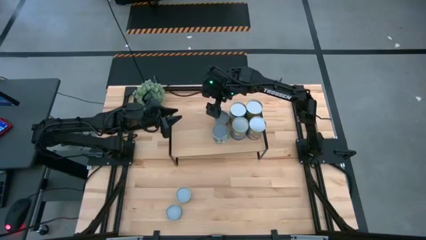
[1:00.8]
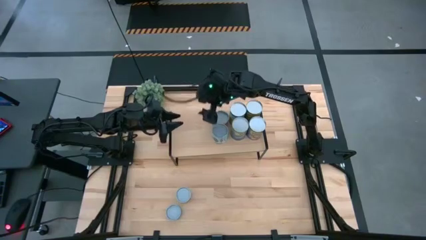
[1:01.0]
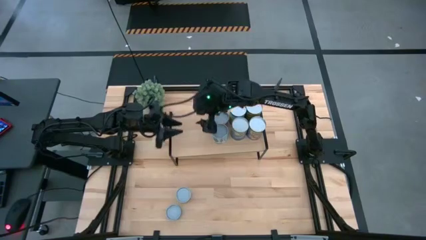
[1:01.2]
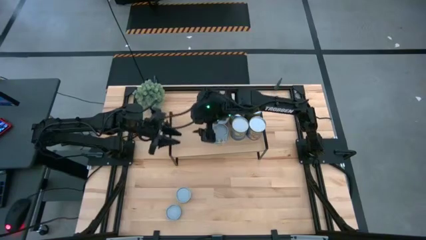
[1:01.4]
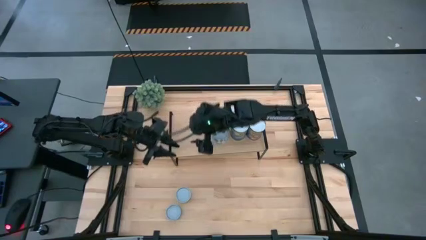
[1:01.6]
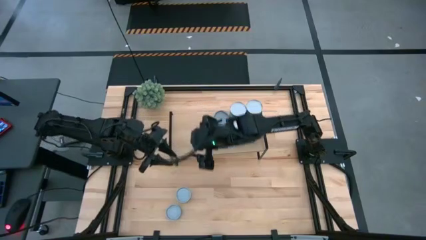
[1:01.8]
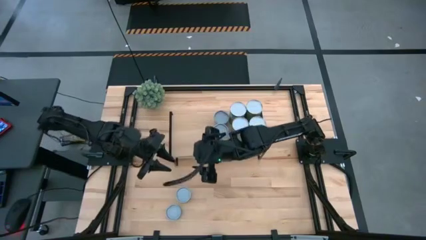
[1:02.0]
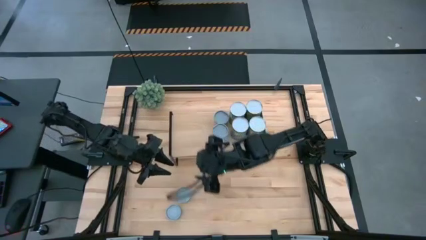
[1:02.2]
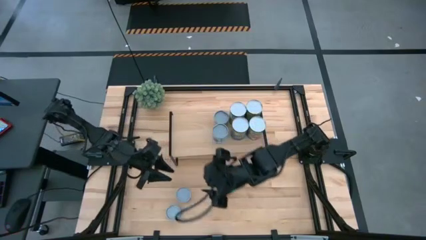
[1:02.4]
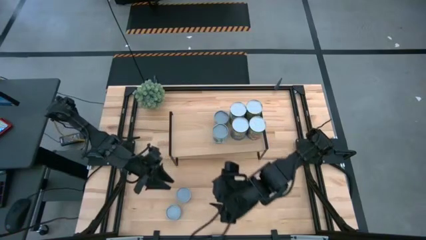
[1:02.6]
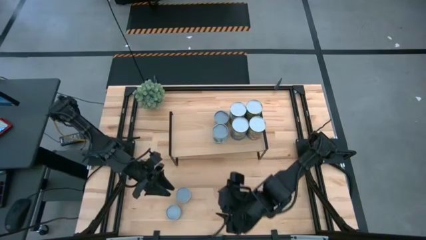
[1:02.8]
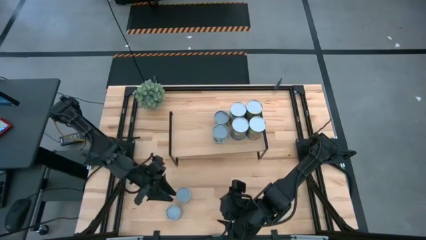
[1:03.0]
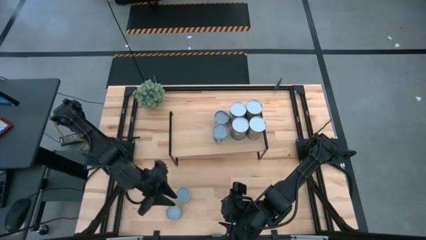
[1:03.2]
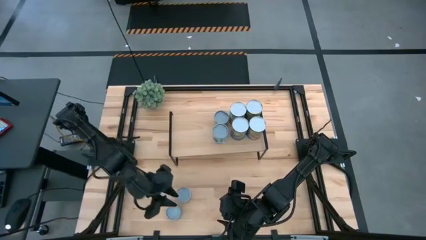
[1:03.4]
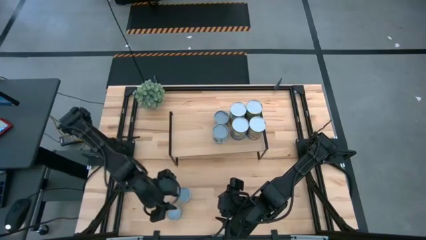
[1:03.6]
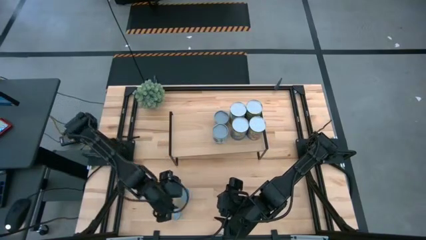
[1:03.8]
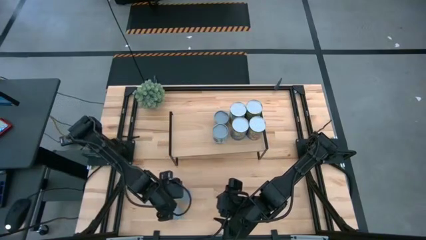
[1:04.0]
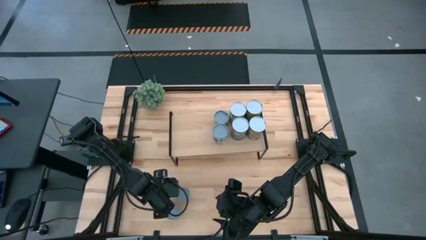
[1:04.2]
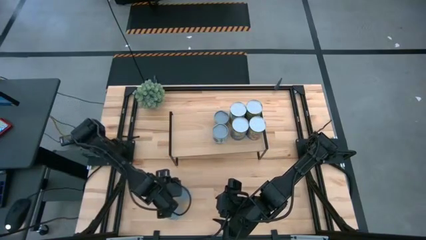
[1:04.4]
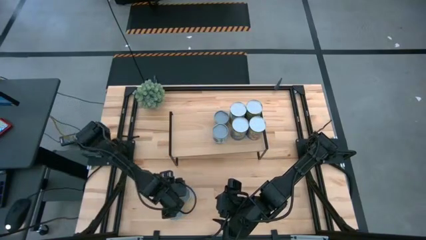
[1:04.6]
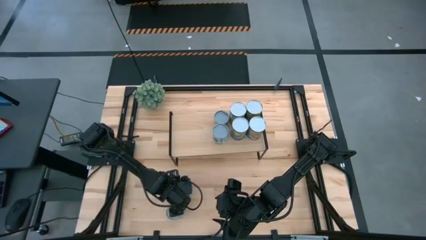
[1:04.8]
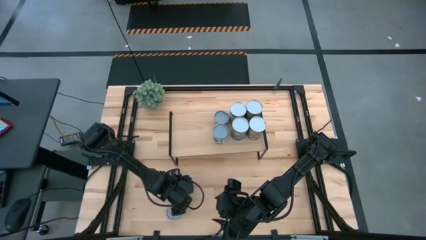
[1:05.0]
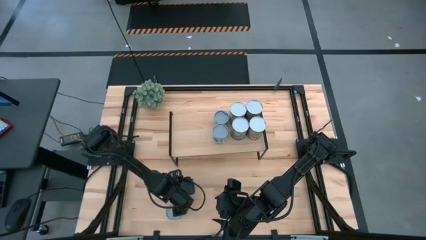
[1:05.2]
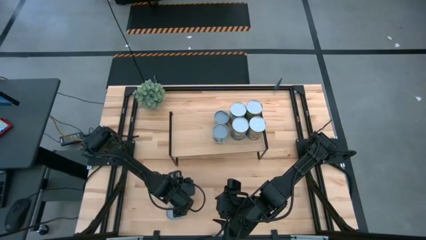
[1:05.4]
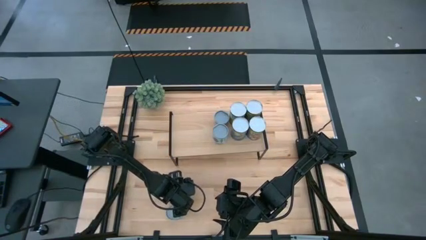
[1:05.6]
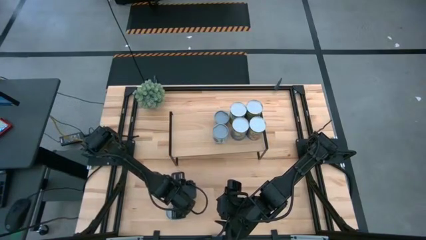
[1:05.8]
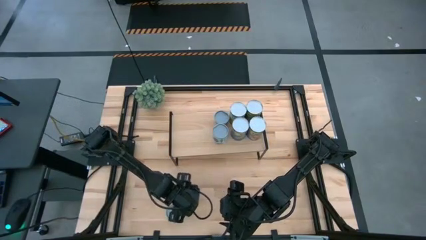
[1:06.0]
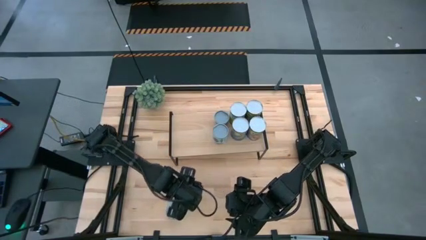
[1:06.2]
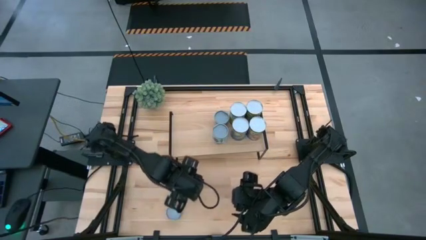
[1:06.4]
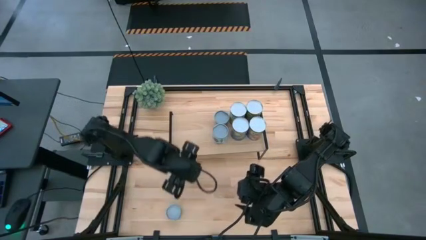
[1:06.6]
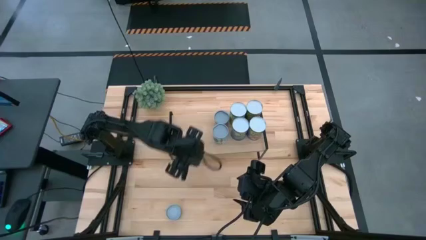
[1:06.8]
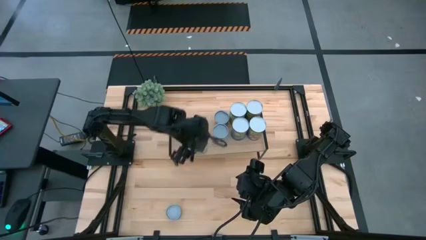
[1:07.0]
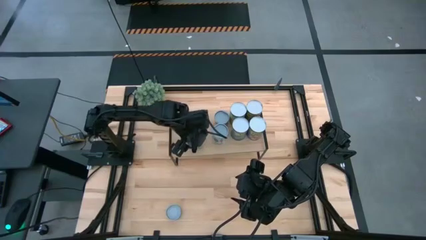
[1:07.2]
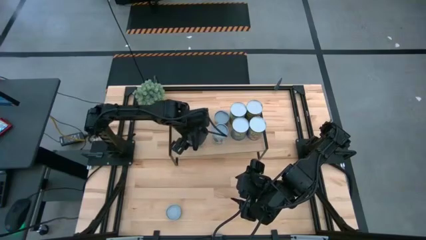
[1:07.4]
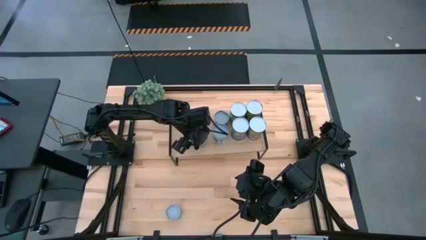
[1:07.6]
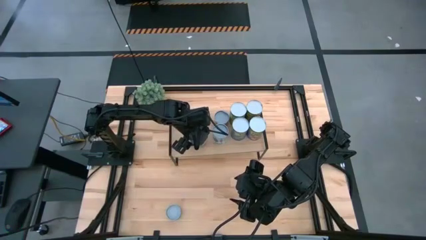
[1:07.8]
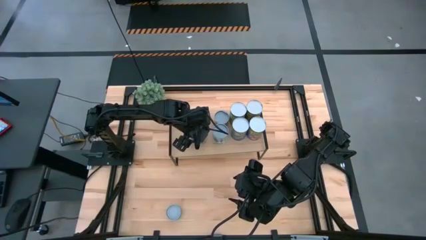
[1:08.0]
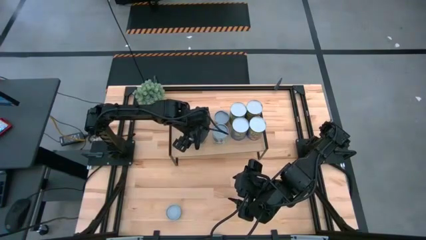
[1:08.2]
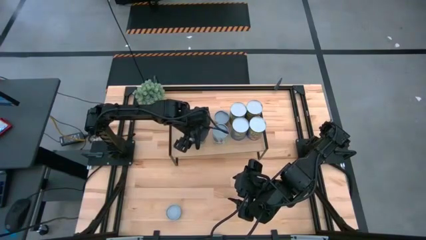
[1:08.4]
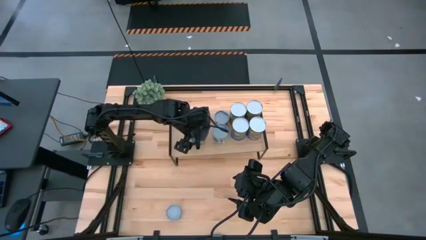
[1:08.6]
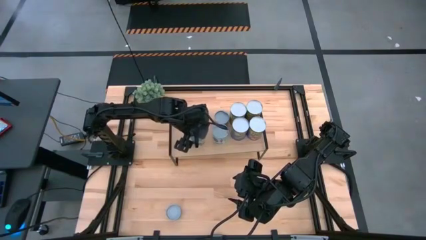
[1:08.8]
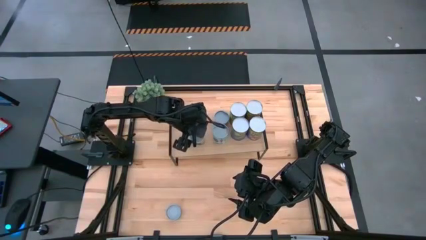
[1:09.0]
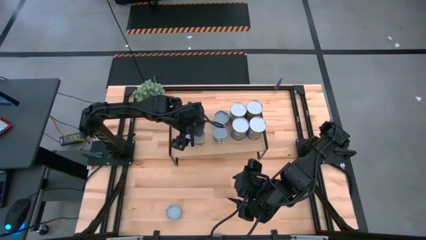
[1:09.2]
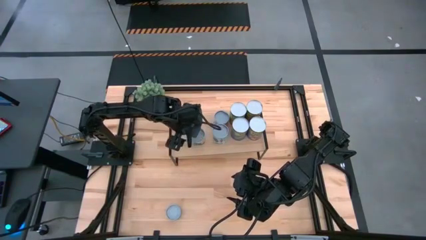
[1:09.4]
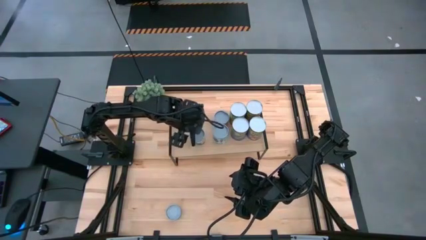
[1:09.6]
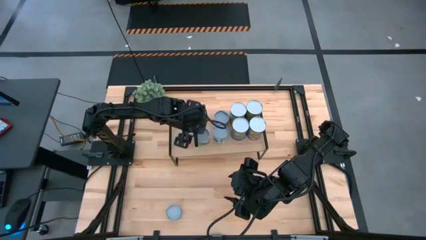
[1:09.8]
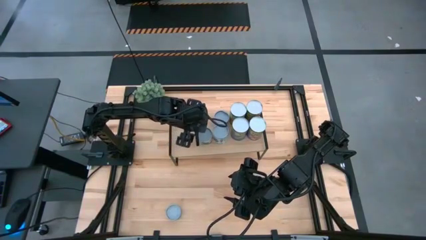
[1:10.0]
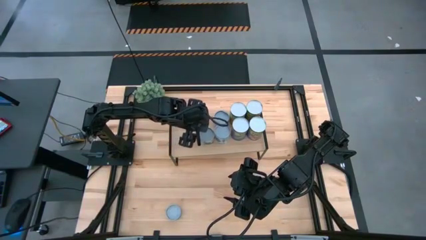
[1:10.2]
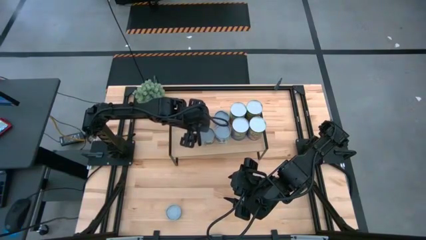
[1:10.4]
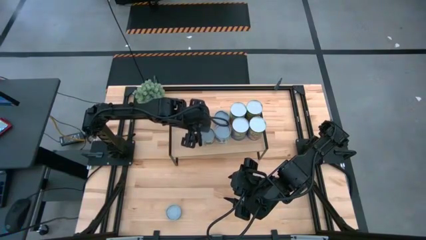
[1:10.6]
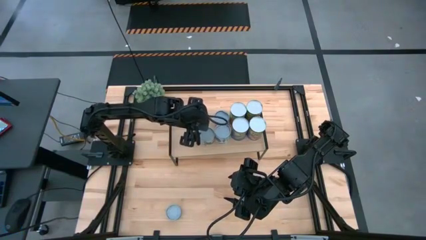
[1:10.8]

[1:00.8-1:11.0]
Task: Pick and place cans onto a shelf
Put the green can on the shelf

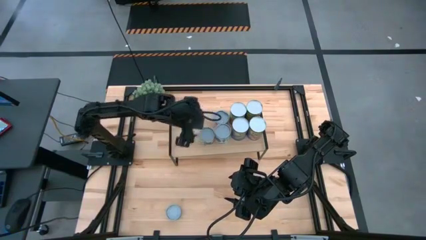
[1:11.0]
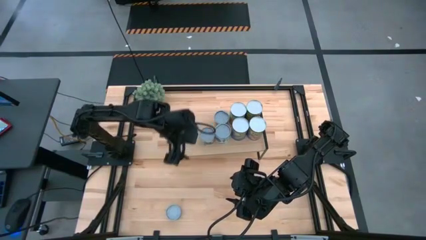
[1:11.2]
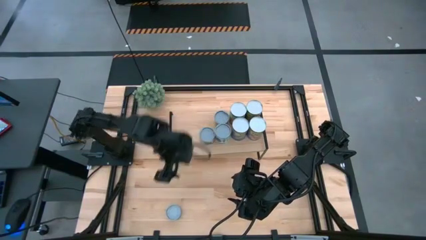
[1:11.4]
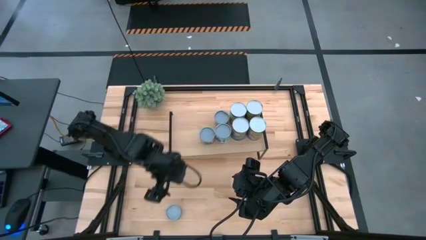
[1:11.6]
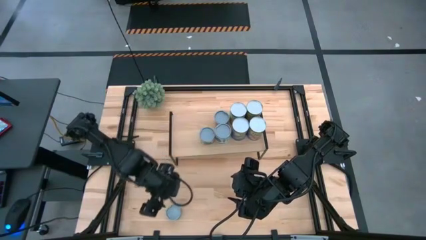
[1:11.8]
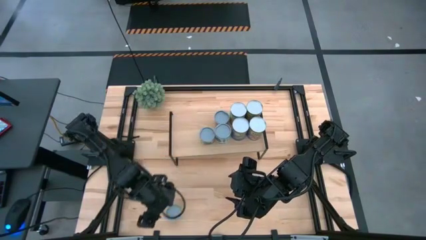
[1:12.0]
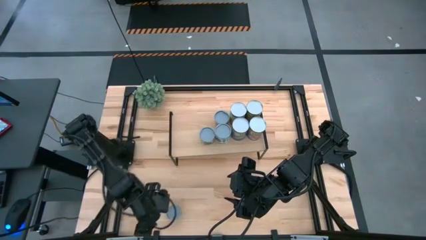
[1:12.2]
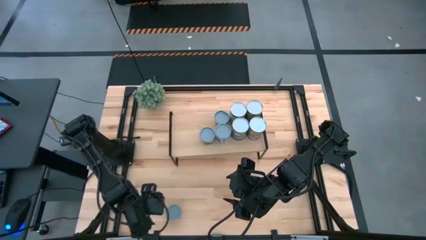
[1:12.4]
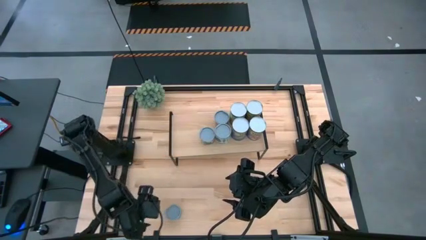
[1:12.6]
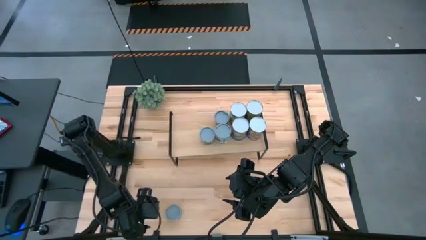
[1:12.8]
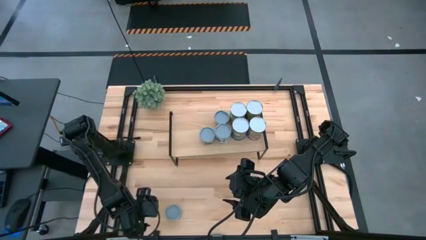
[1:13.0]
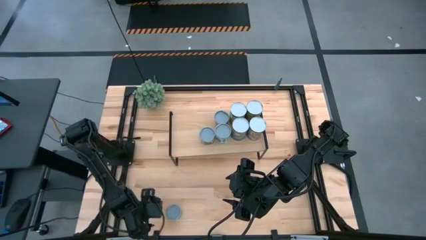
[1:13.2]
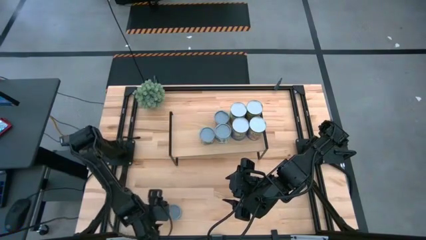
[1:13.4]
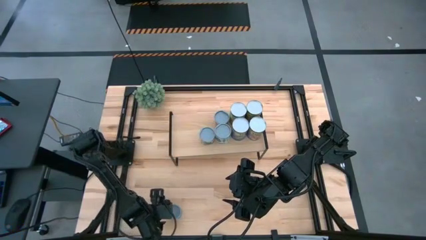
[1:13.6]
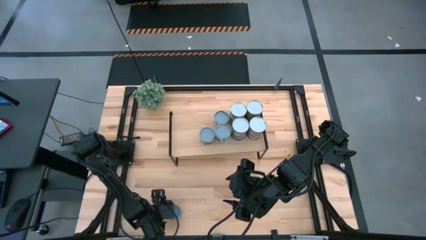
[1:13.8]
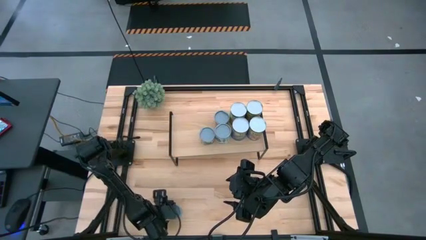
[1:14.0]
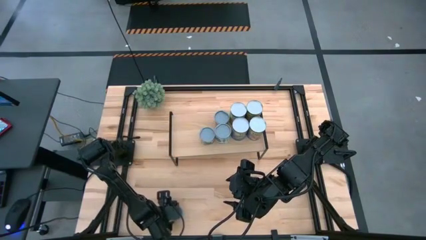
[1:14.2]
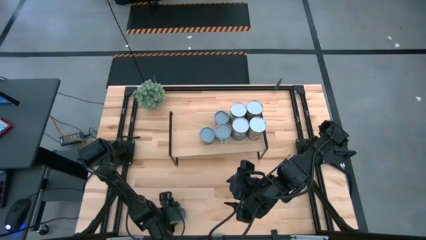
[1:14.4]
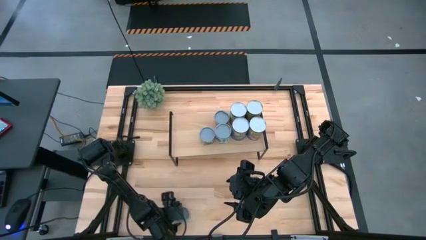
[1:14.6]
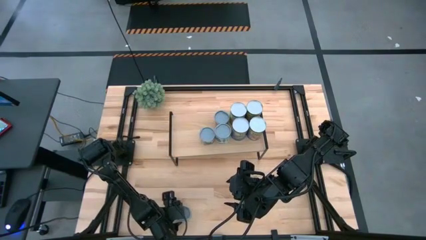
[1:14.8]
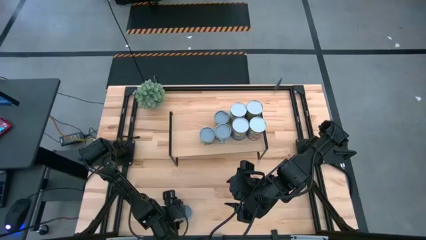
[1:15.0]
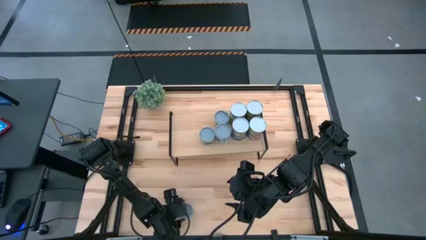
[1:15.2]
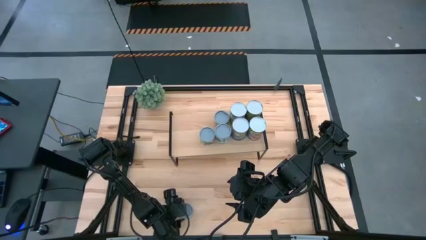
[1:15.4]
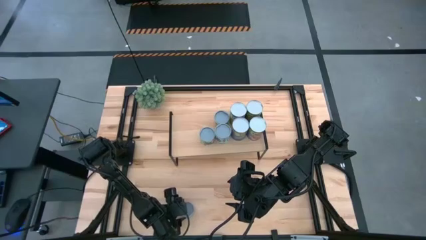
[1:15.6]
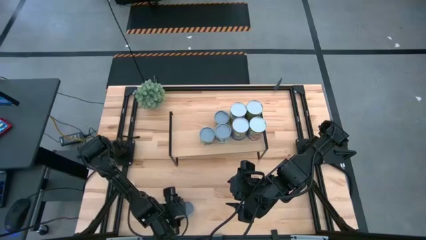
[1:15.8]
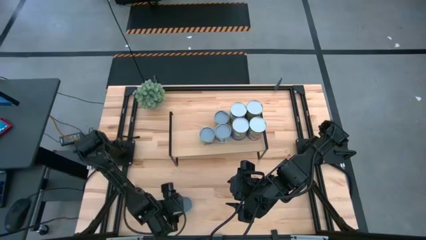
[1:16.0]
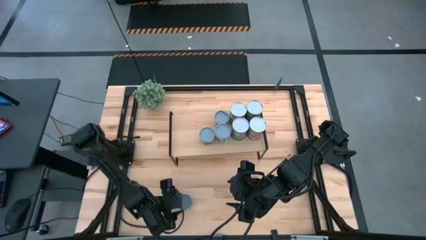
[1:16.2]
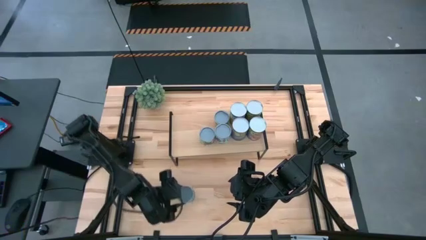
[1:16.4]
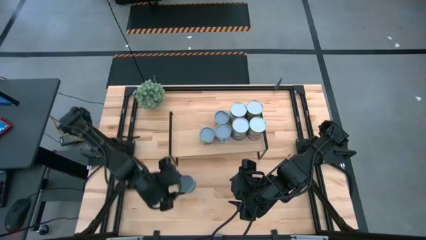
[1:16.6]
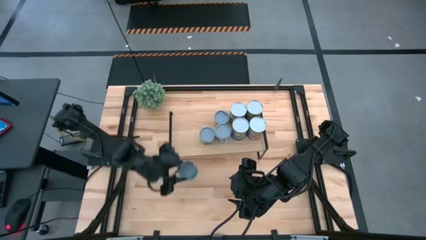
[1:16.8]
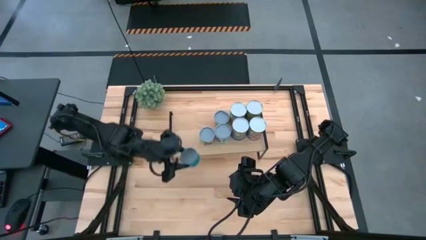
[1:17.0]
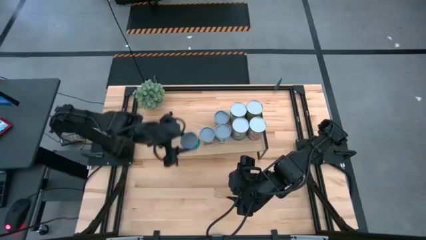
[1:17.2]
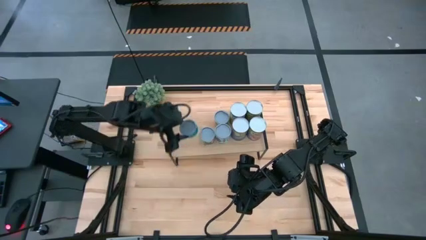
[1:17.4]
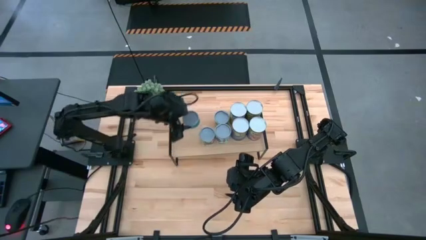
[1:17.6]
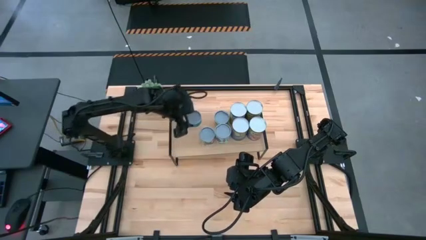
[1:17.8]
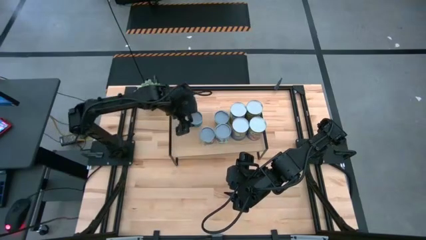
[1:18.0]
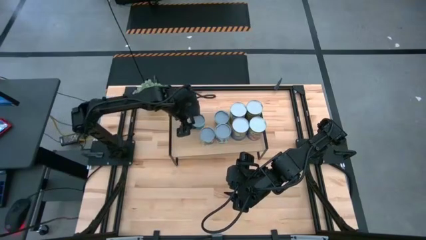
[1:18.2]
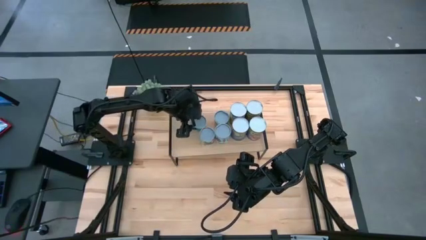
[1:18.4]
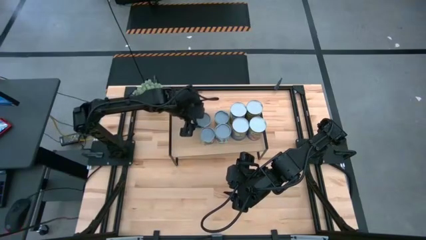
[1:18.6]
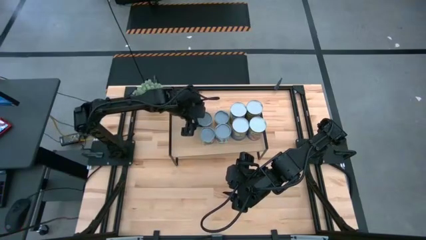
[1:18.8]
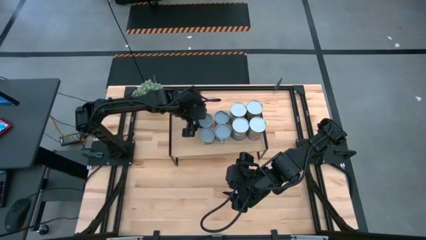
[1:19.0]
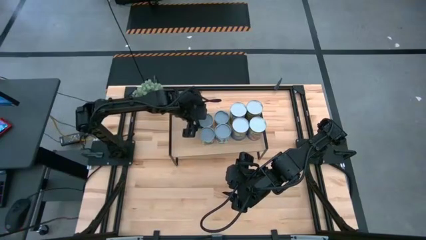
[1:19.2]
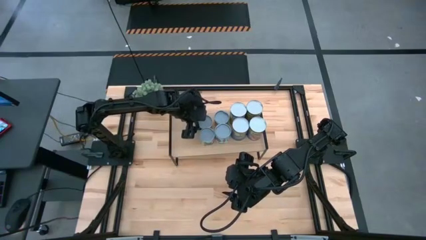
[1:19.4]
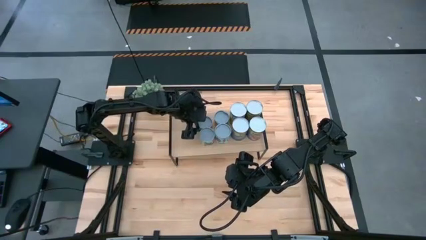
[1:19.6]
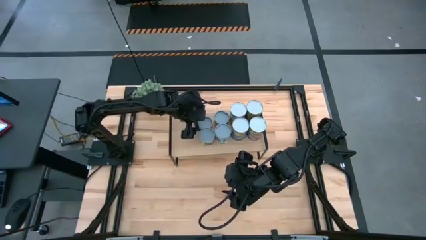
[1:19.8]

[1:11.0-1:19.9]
Put the blue tuna can on the shelf aligned with the green can
